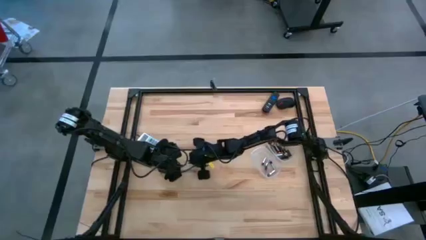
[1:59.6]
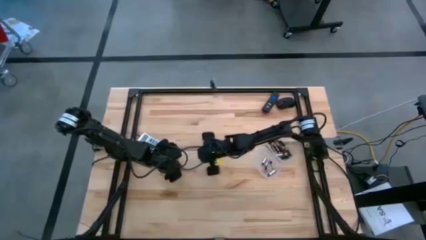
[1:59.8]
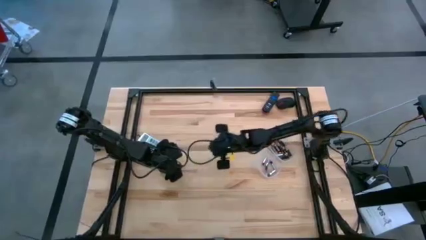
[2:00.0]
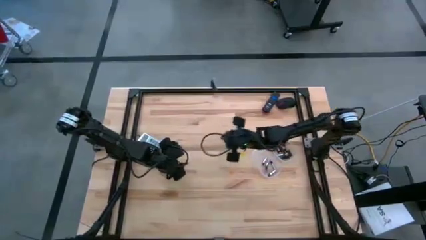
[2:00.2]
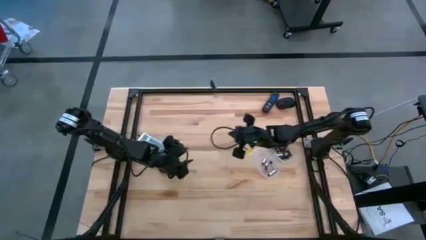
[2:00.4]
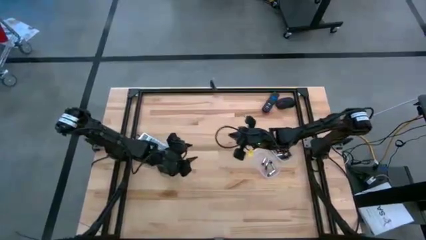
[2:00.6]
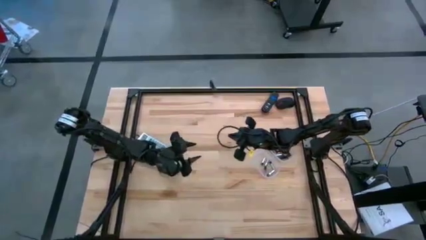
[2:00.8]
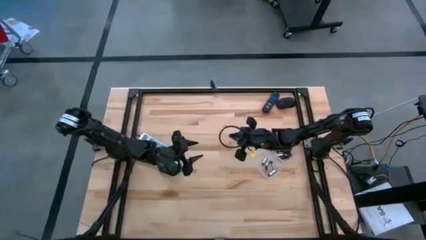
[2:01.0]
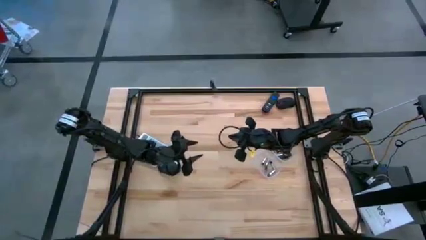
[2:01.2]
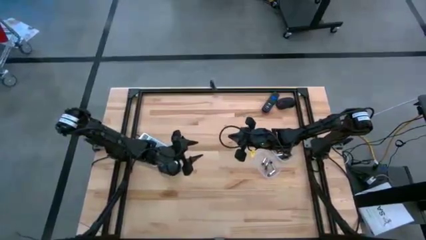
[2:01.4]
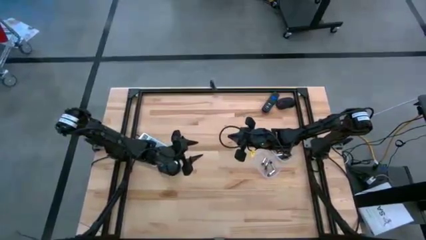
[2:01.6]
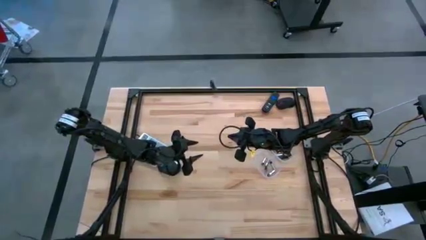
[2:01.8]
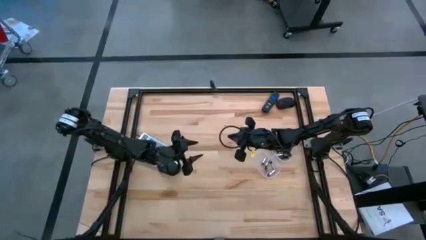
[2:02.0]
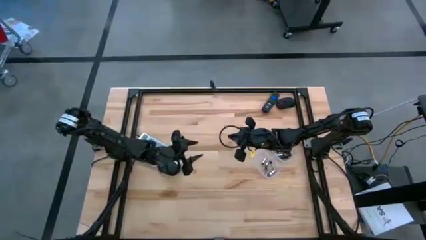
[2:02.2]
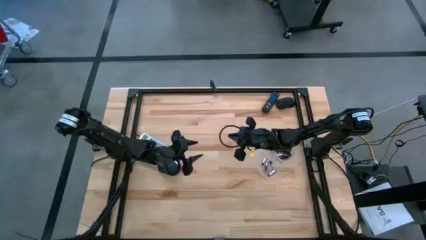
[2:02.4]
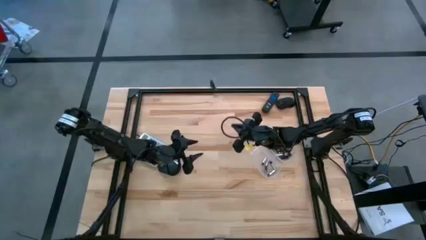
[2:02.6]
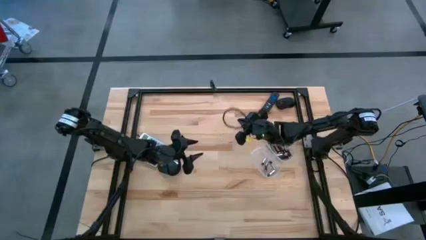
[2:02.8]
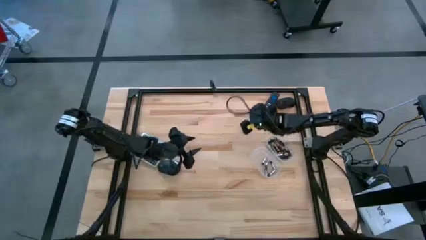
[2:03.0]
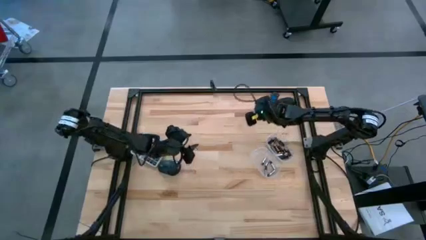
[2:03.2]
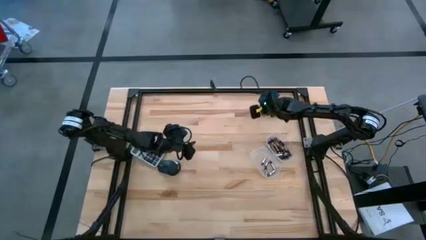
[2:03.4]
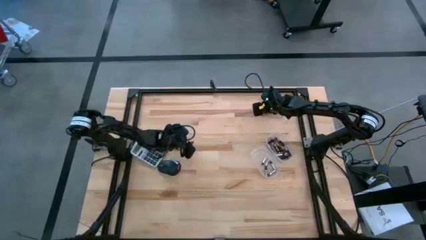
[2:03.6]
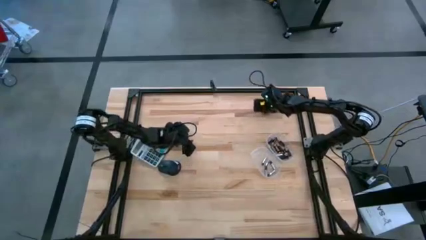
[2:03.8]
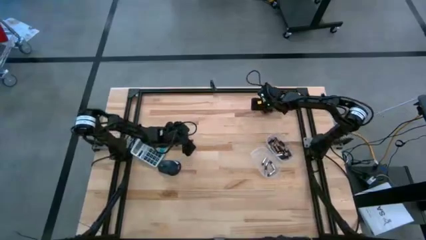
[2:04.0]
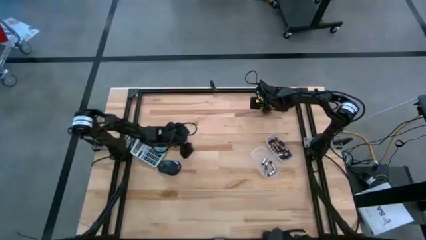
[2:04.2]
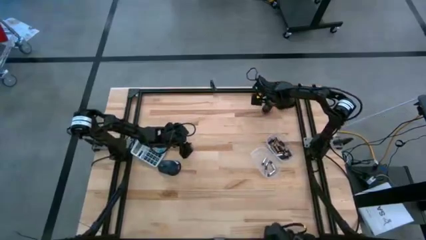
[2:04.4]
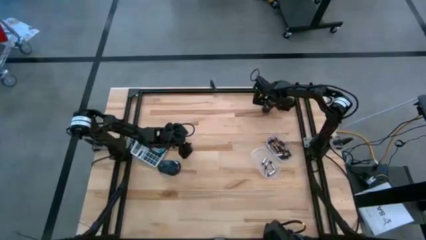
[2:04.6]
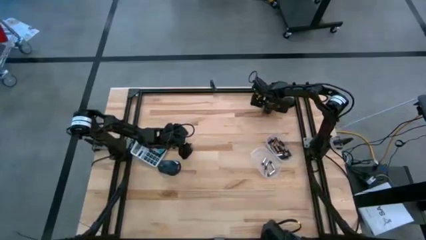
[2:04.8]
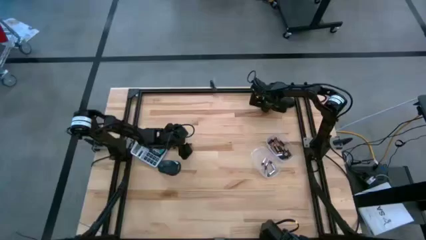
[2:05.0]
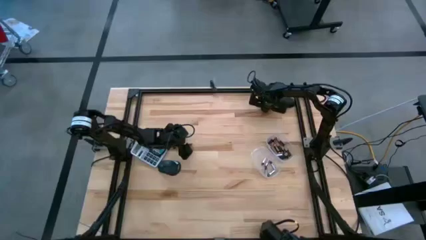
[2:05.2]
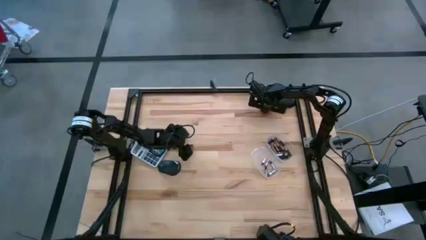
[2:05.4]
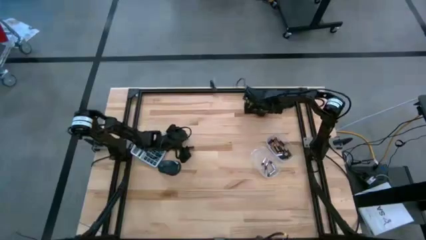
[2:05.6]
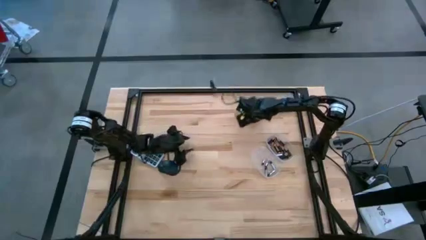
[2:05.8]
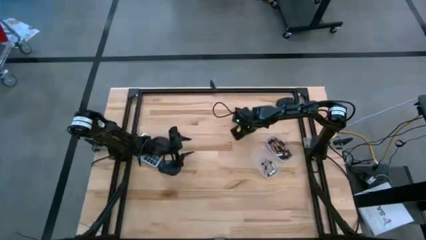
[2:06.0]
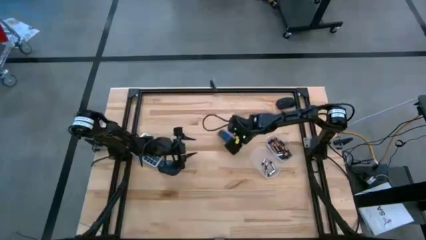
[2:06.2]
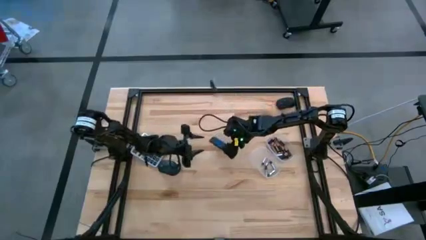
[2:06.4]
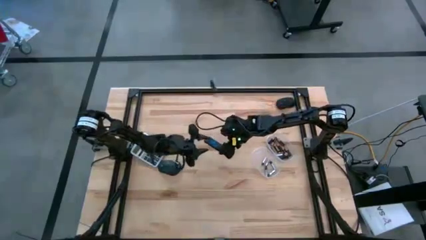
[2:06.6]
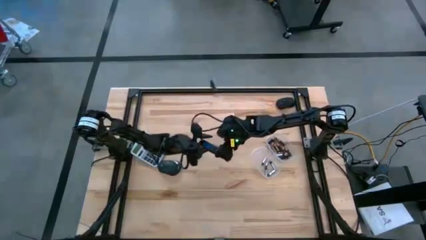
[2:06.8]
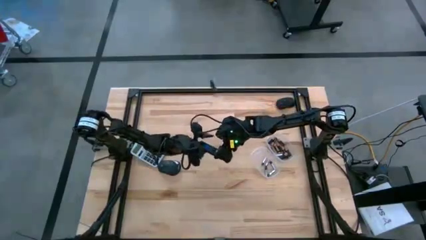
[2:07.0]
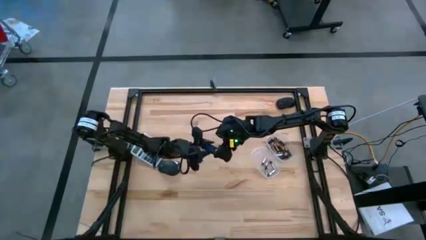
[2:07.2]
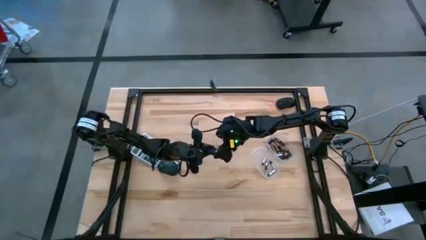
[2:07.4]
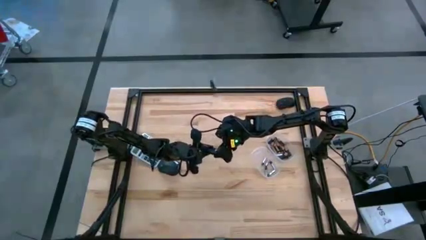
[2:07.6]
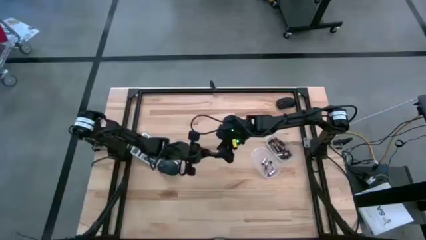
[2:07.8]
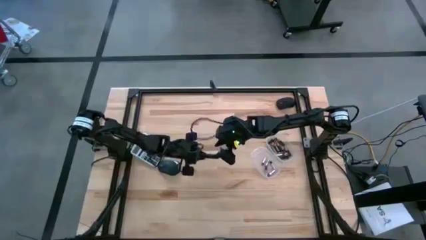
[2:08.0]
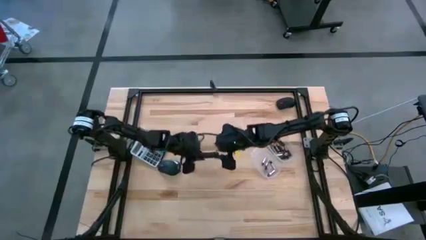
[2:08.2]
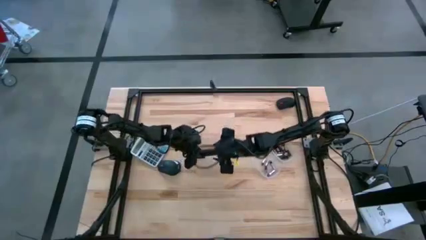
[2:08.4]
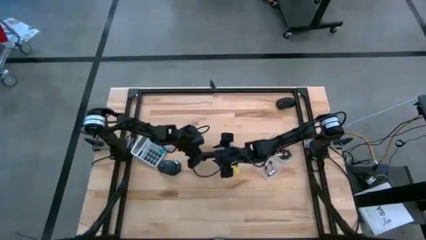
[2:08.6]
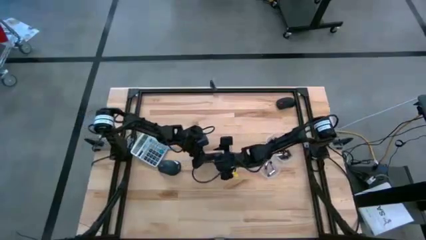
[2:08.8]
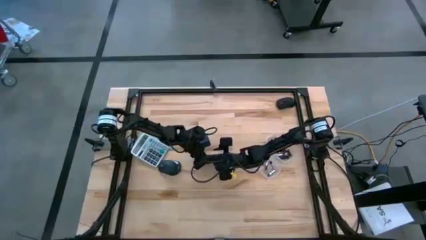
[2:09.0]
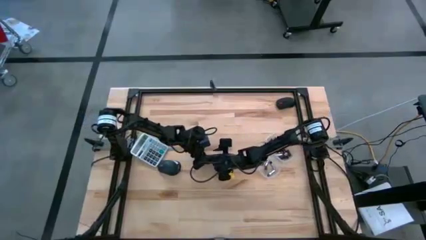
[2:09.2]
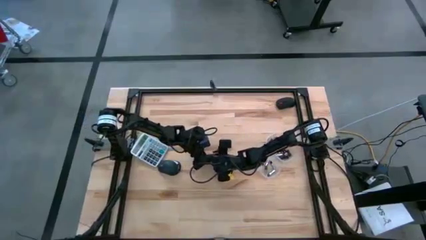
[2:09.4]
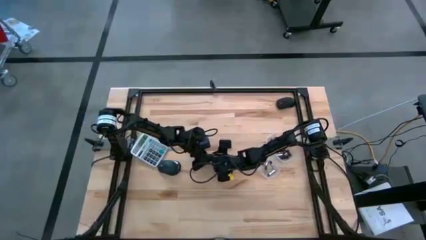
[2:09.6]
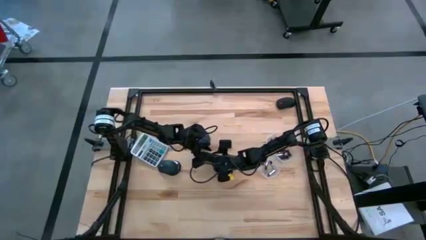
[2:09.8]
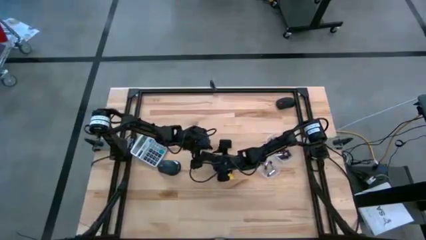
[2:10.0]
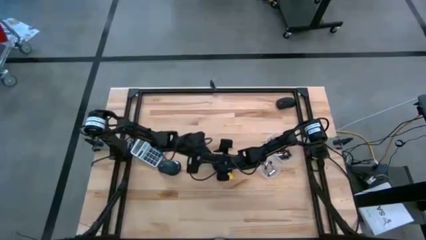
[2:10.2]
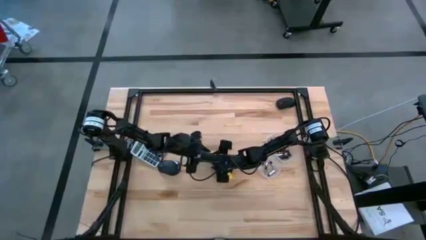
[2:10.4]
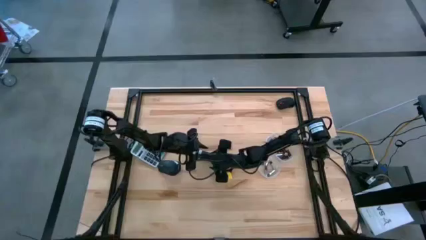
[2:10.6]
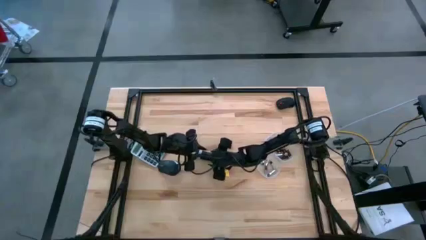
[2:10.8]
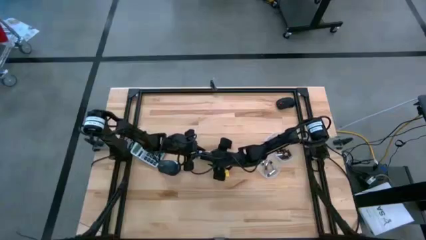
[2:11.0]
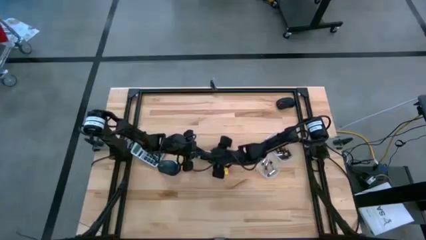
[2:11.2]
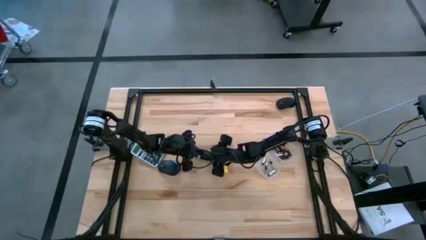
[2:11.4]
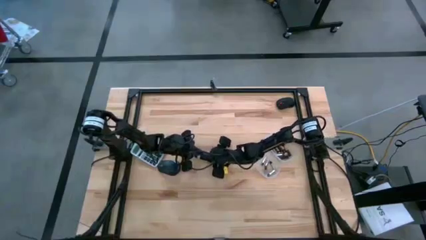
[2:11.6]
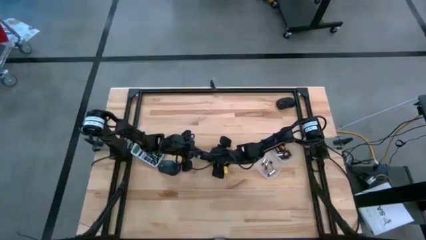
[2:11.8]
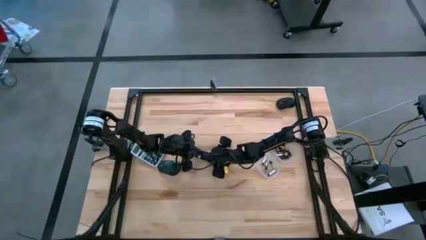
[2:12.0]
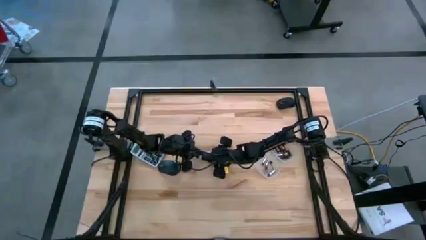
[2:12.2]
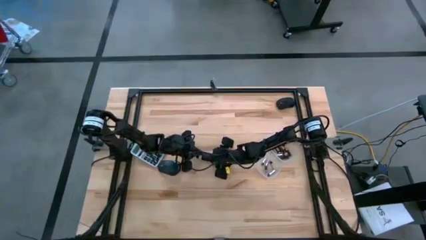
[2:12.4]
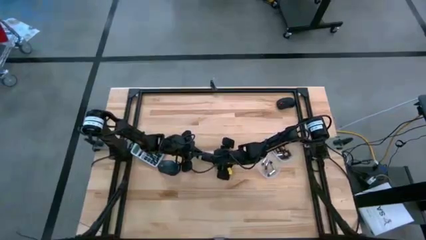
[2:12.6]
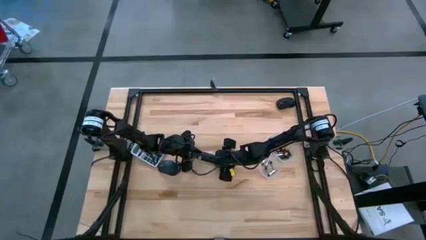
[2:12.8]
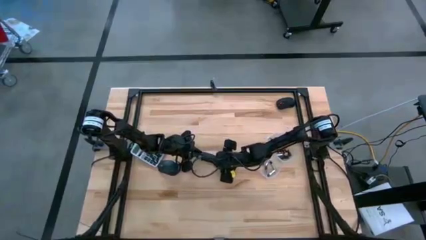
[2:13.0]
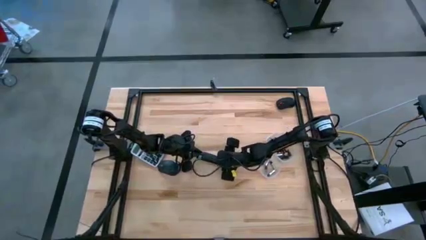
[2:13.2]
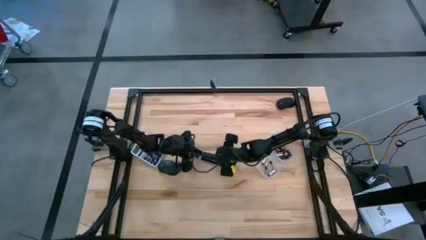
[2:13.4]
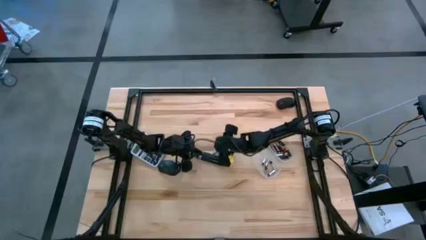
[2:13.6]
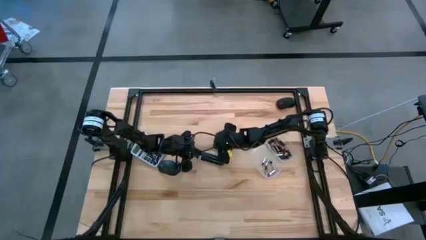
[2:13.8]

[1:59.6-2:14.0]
Task: Insert battery
Open the remote battery compartment

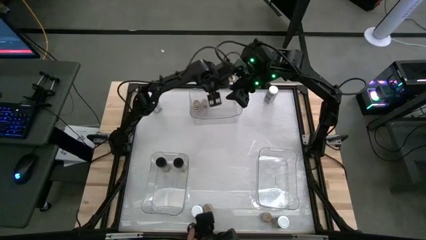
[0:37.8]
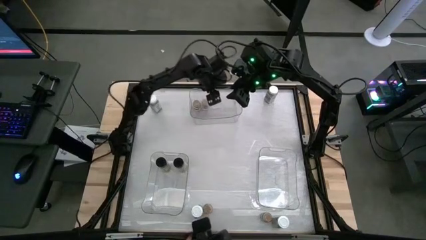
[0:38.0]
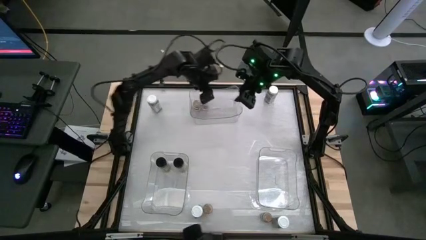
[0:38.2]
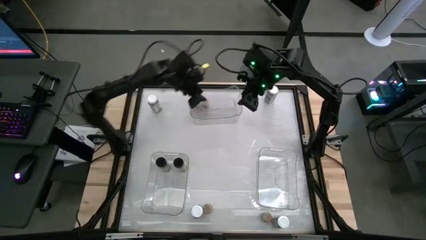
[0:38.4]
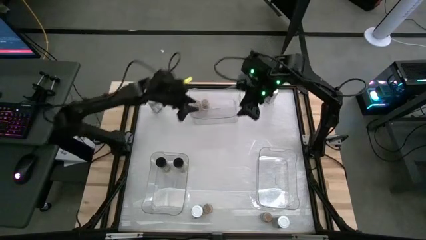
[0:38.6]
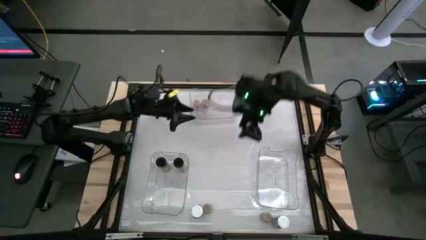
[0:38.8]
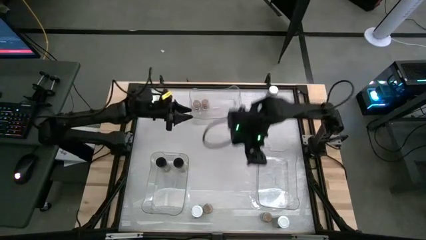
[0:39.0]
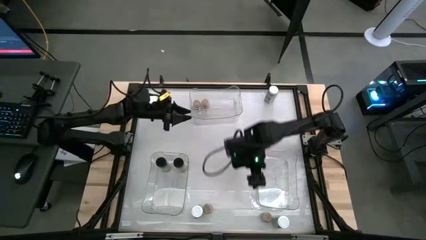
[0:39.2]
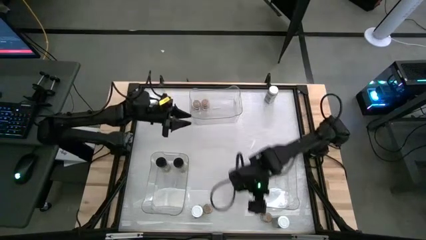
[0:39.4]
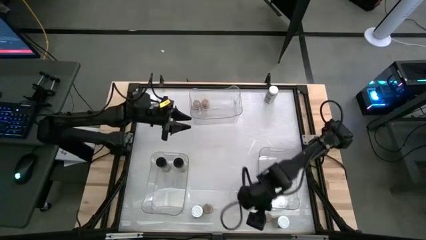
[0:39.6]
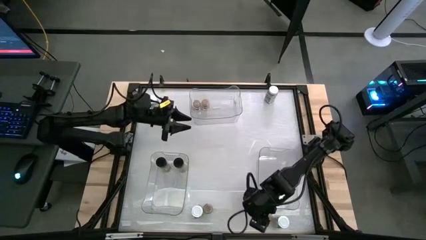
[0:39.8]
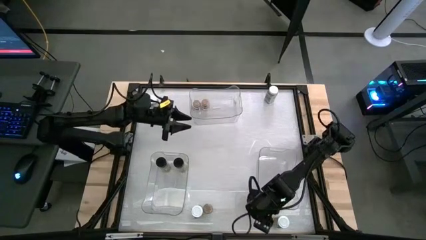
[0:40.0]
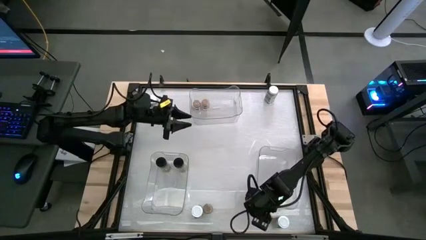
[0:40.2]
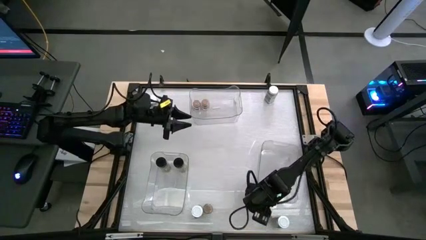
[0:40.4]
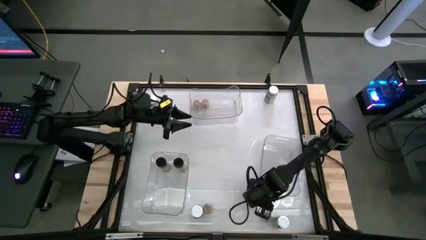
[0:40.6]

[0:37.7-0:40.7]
Task: Sort spices by type
Adjust the bottom right transparent bin on the table
